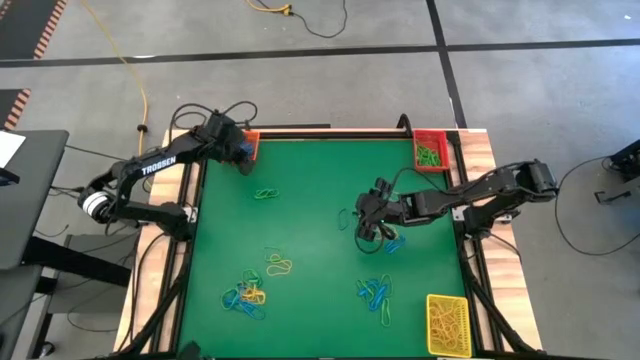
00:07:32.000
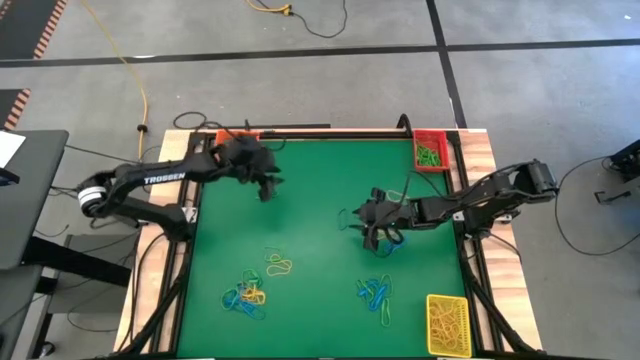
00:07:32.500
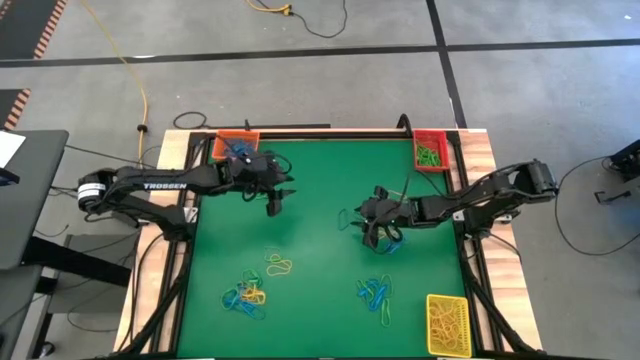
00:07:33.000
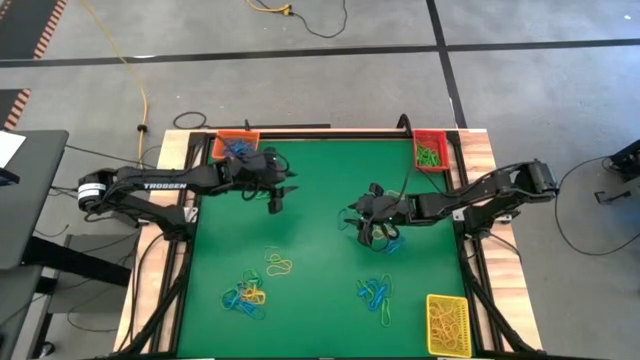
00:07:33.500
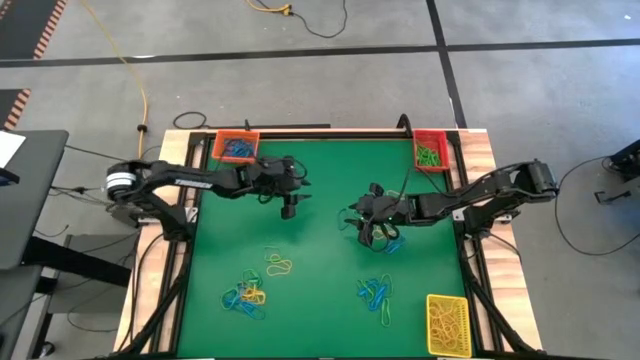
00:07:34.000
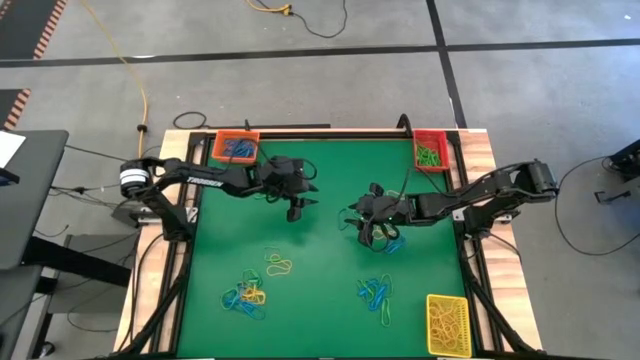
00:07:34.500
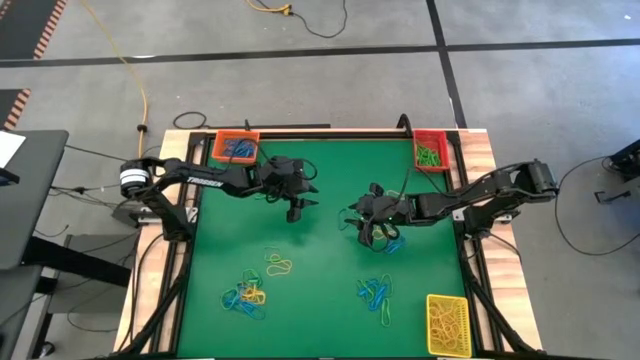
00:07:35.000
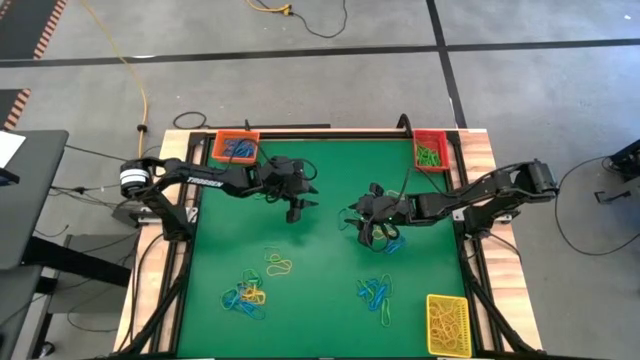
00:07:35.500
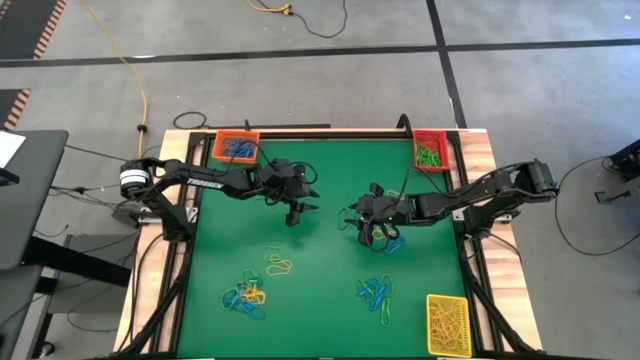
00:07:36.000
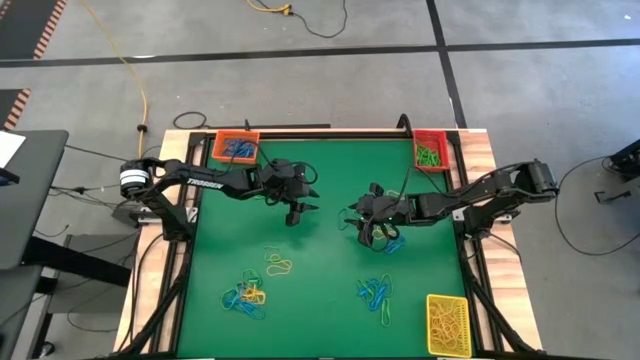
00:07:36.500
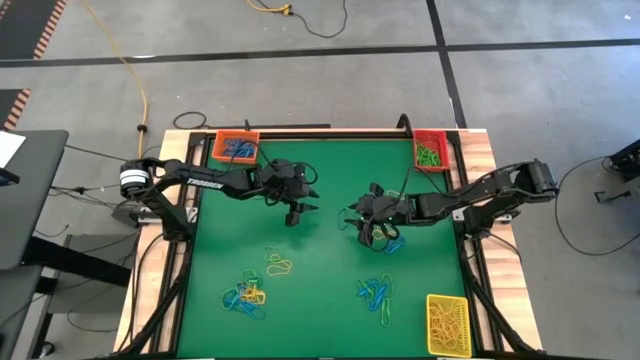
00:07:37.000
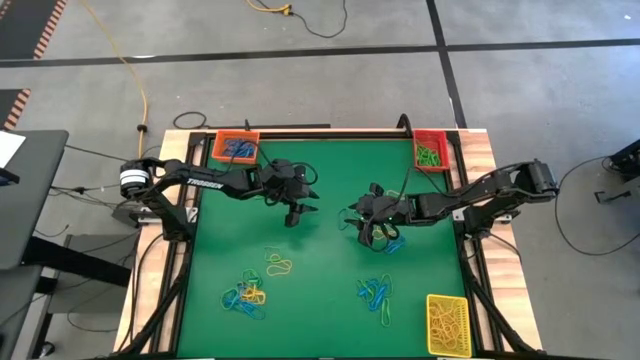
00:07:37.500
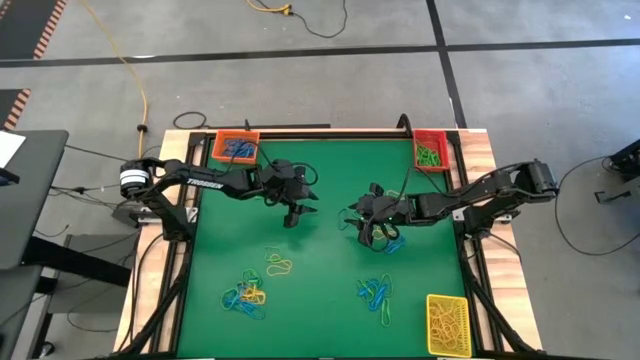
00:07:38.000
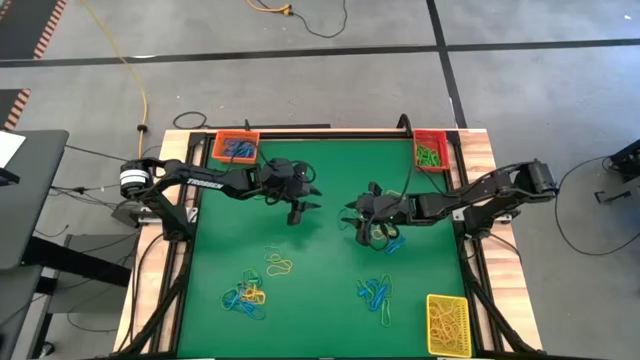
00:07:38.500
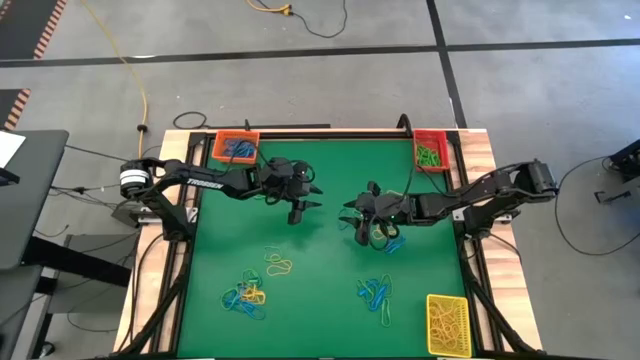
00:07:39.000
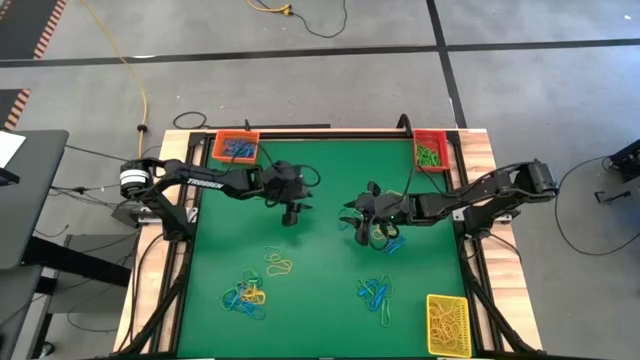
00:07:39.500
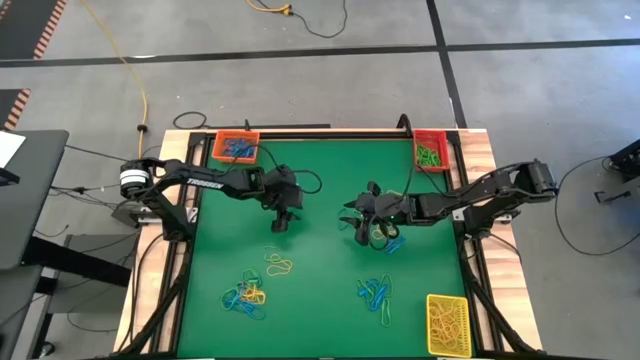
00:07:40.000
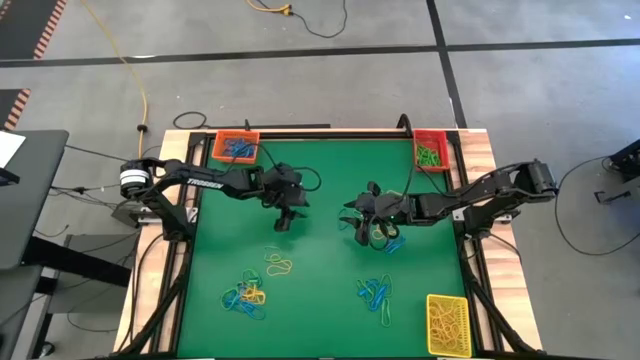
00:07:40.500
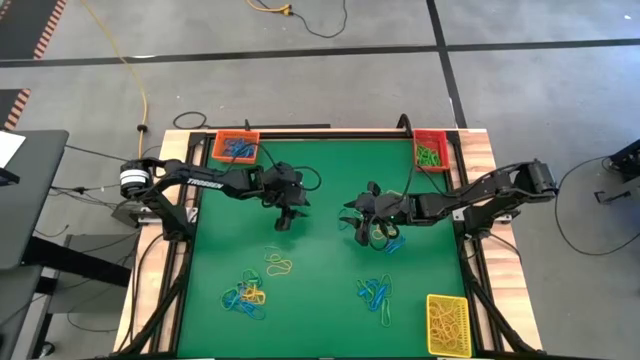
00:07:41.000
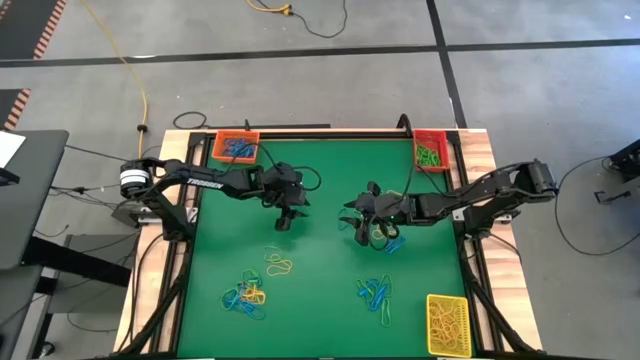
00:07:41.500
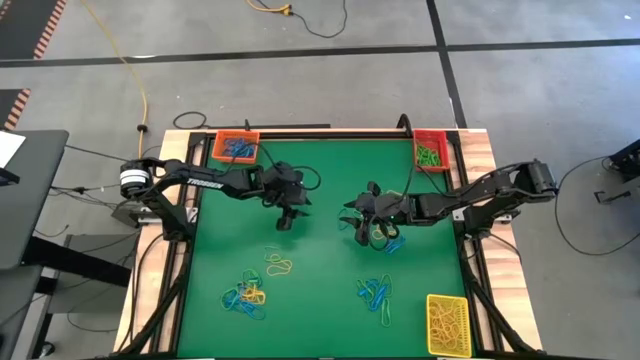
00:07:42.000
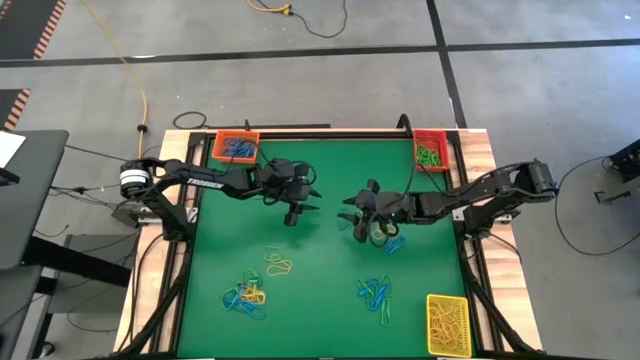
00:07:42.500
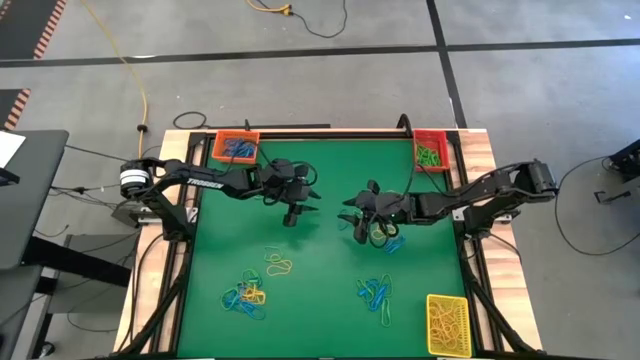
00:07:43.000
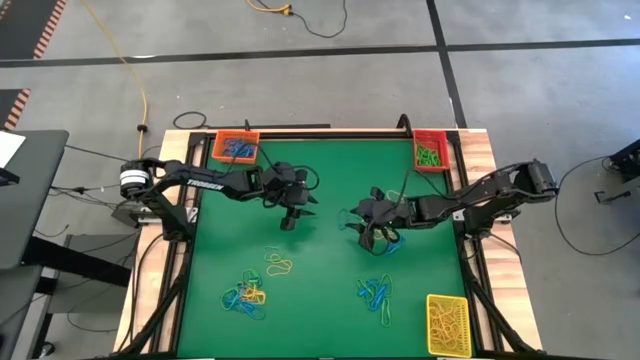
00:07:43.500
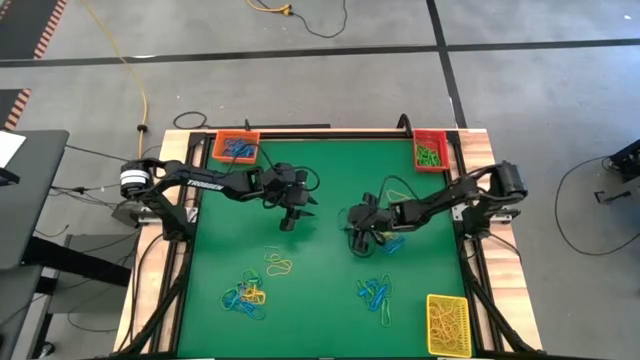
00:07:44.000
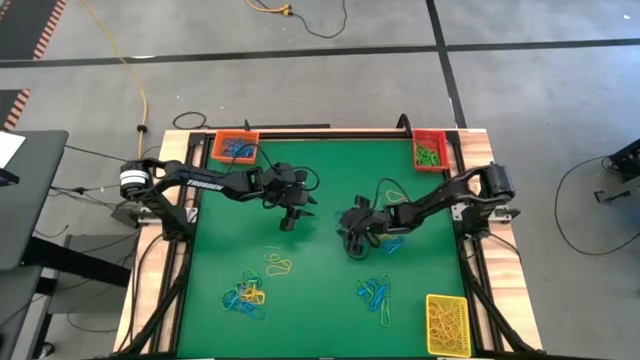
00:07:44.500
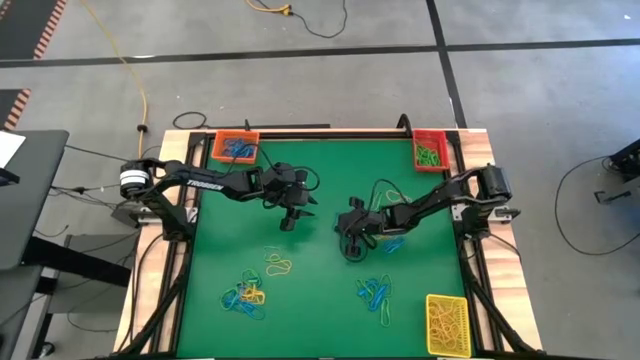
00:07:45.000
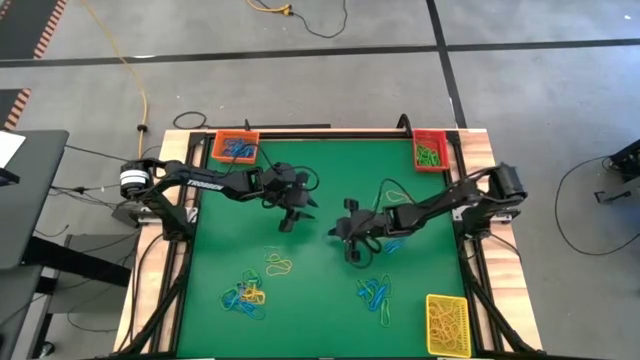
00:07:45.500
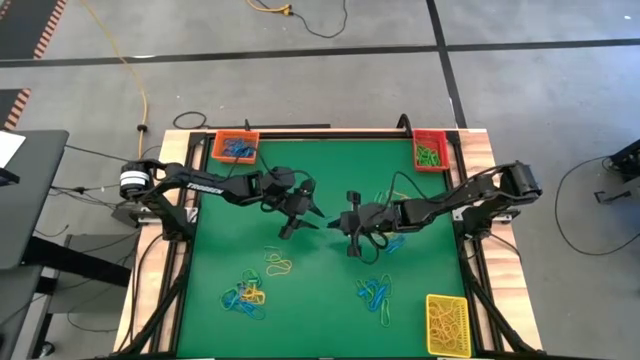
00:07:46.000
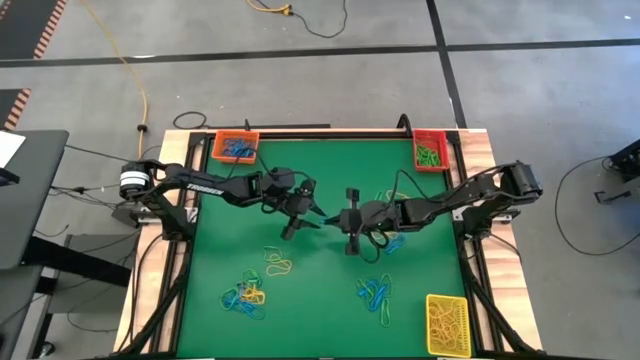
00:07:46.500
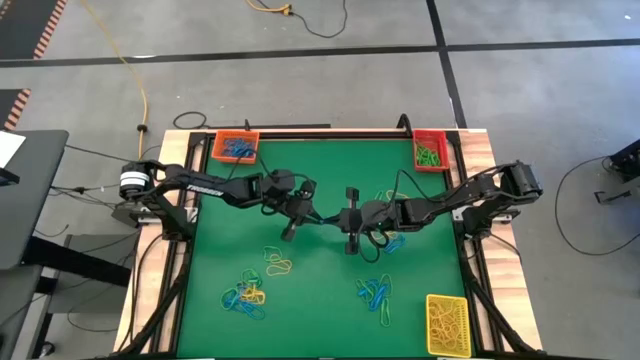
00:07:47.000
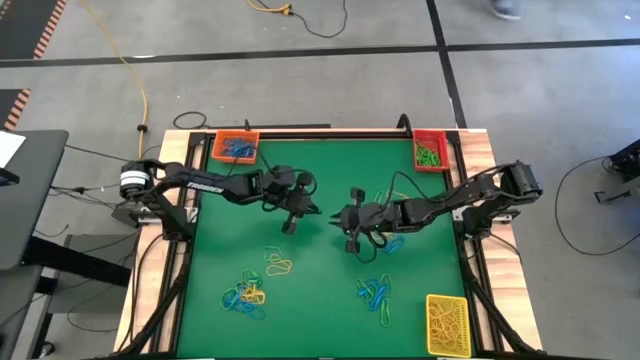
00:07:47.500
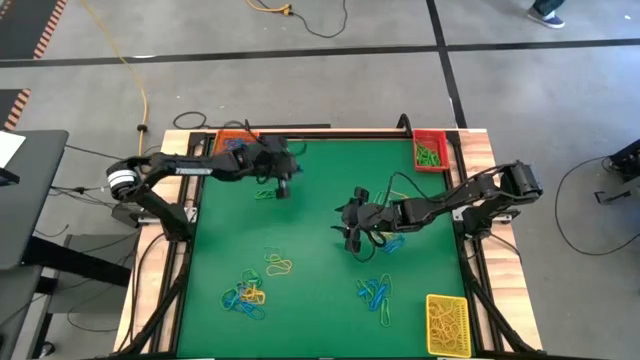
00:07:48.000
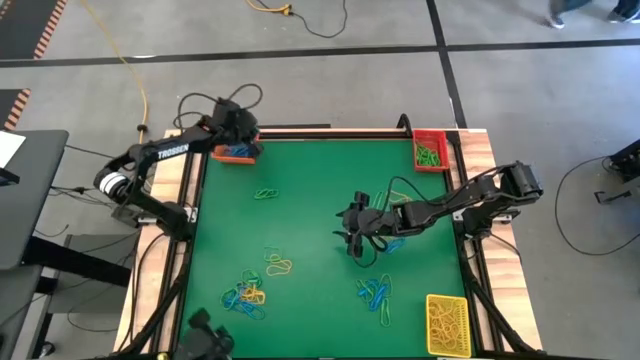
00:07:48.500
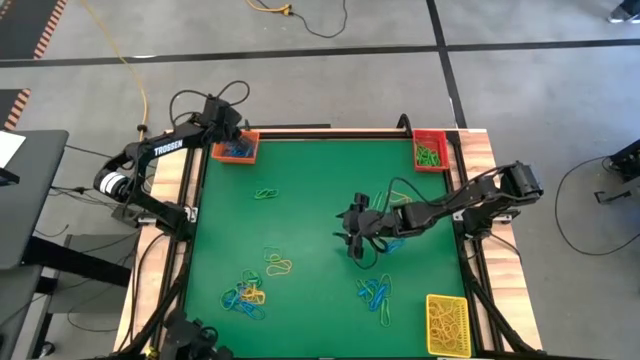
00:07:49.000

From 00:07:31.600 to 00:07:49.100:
Task: Sort rubber bands into baskets
Put the top right blue rubber band into the orange bin
